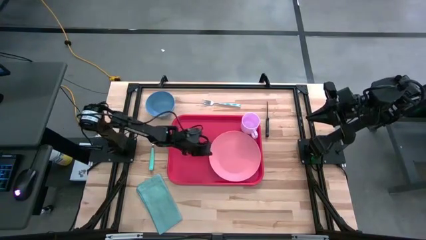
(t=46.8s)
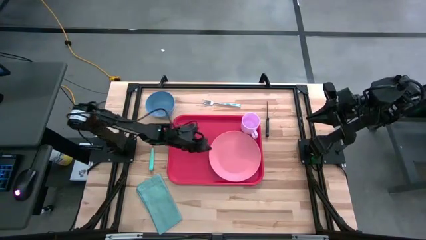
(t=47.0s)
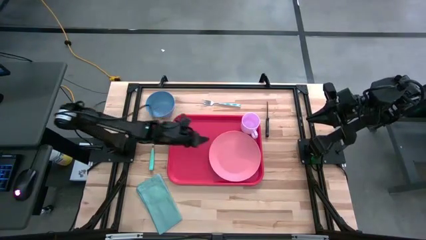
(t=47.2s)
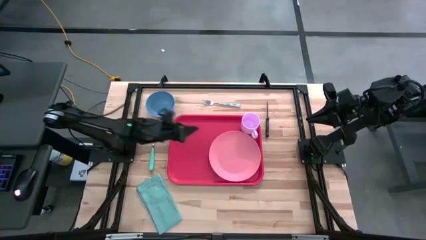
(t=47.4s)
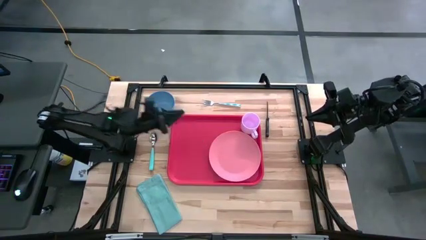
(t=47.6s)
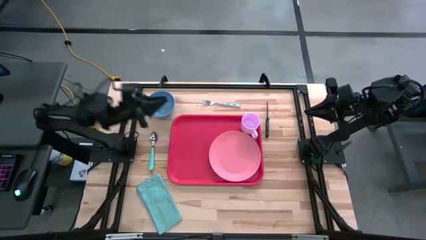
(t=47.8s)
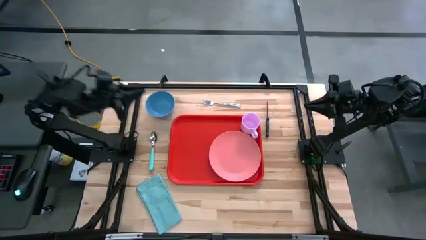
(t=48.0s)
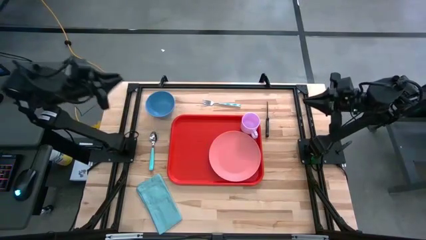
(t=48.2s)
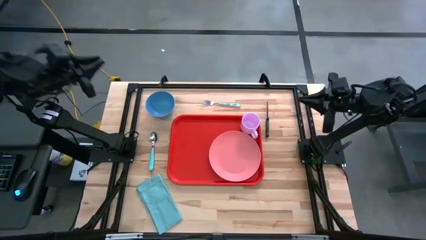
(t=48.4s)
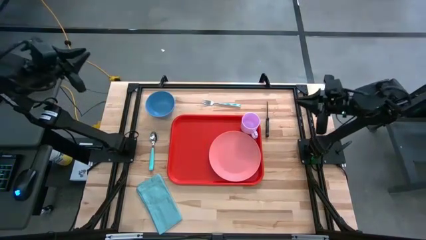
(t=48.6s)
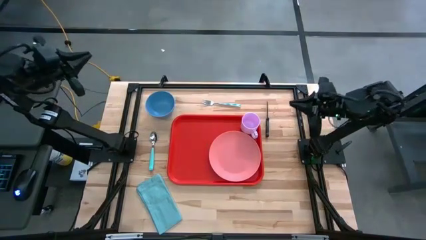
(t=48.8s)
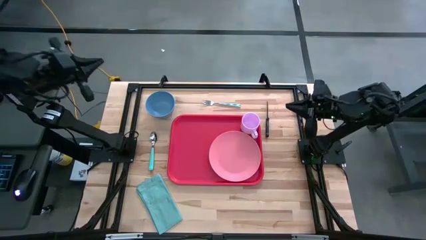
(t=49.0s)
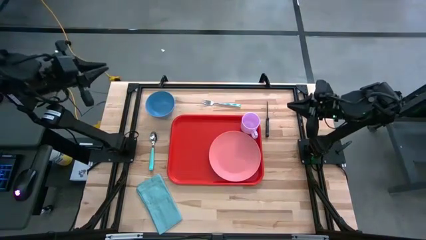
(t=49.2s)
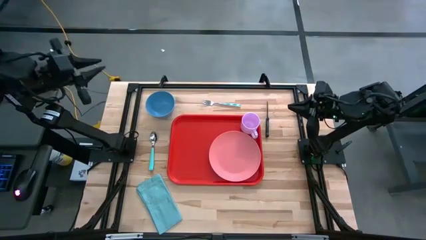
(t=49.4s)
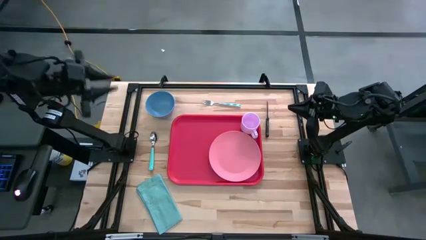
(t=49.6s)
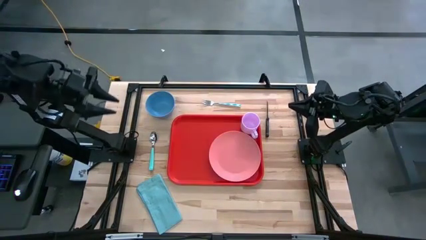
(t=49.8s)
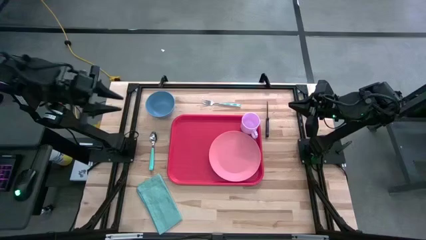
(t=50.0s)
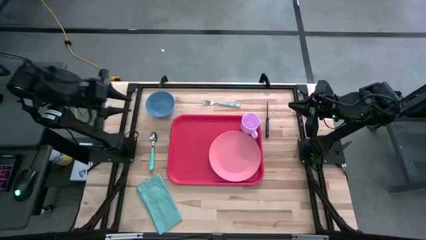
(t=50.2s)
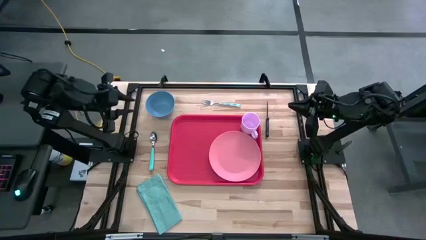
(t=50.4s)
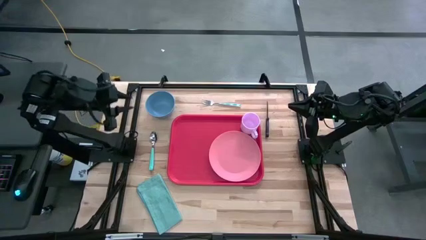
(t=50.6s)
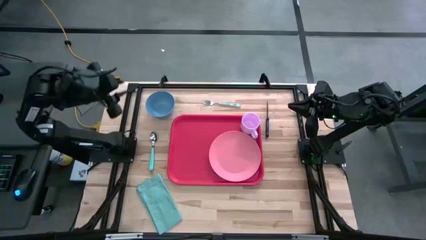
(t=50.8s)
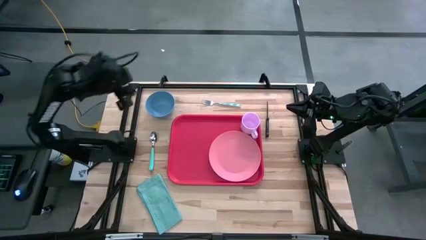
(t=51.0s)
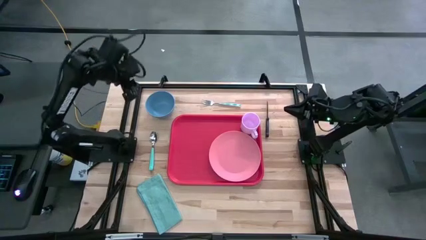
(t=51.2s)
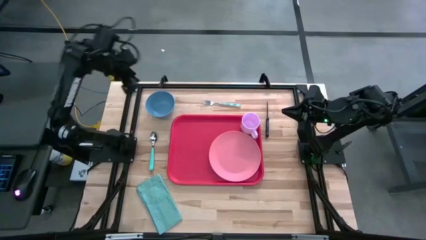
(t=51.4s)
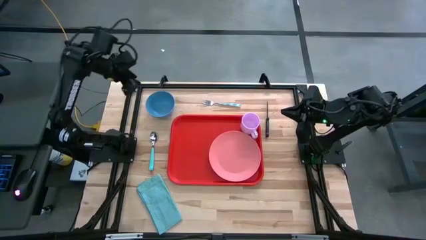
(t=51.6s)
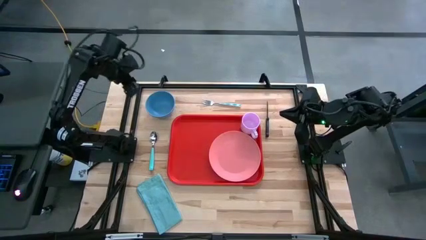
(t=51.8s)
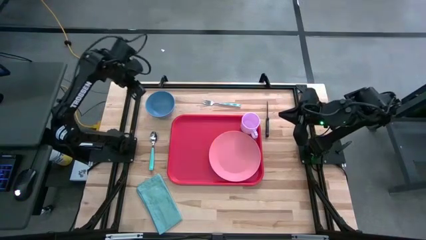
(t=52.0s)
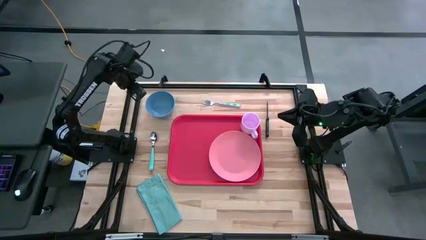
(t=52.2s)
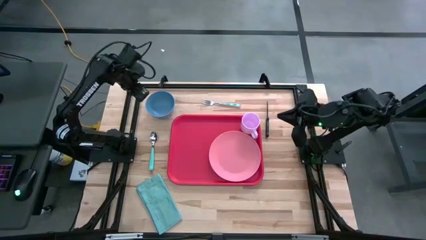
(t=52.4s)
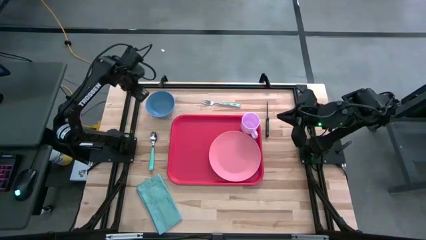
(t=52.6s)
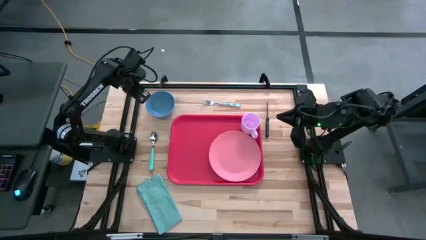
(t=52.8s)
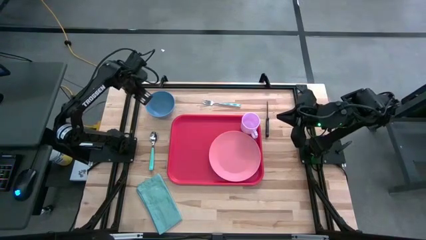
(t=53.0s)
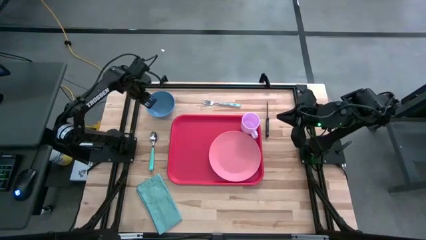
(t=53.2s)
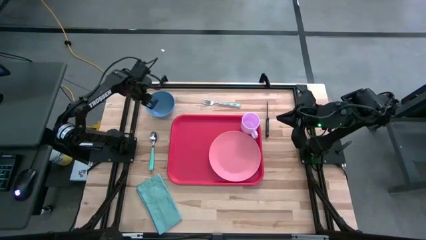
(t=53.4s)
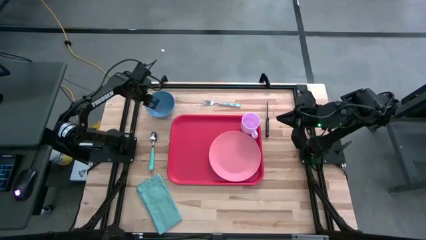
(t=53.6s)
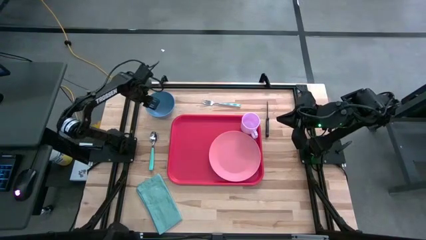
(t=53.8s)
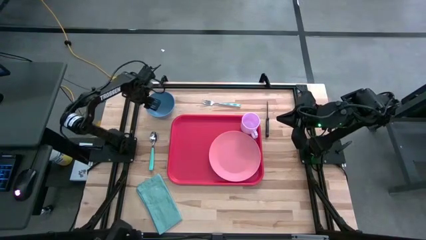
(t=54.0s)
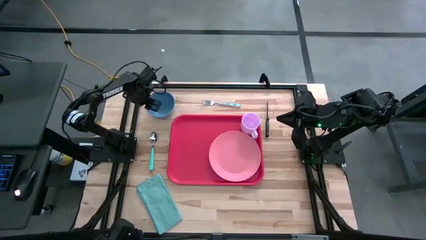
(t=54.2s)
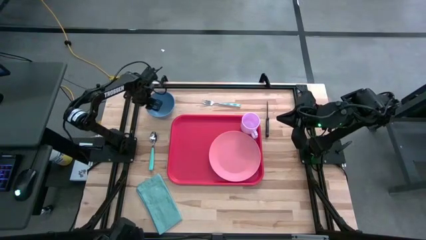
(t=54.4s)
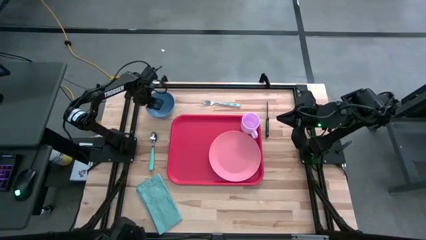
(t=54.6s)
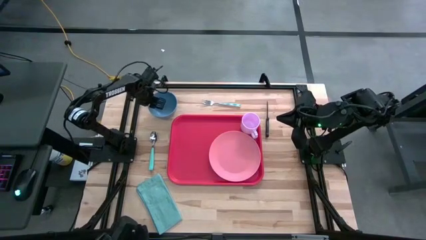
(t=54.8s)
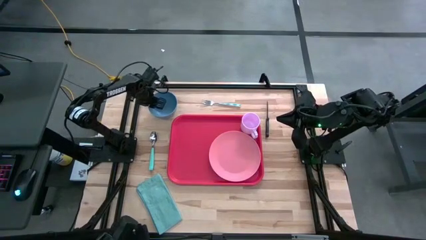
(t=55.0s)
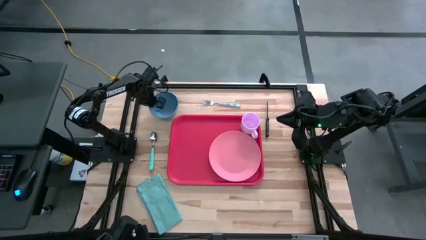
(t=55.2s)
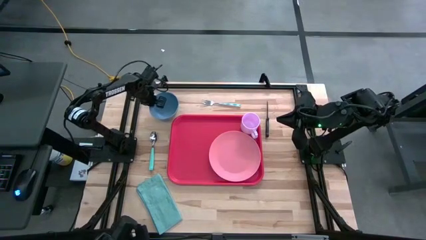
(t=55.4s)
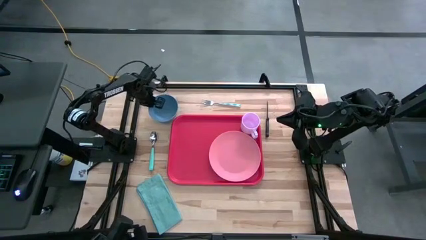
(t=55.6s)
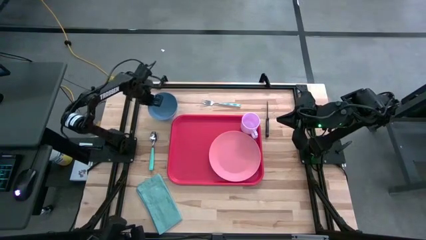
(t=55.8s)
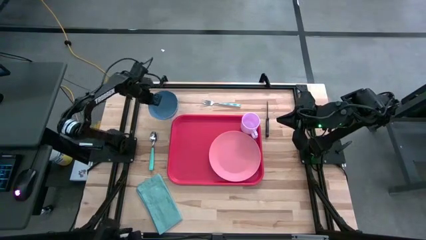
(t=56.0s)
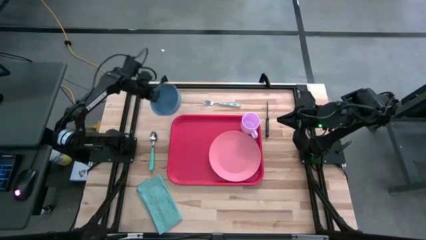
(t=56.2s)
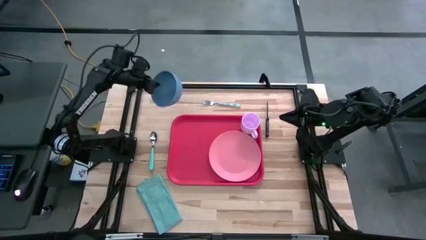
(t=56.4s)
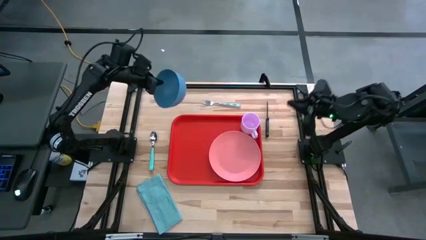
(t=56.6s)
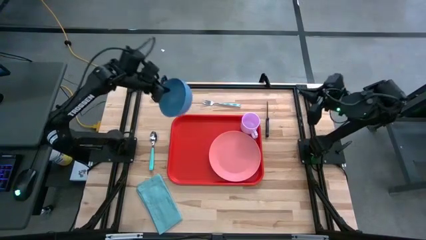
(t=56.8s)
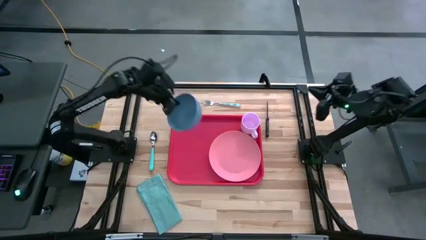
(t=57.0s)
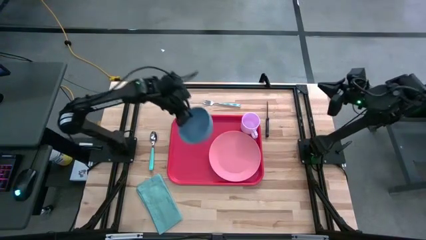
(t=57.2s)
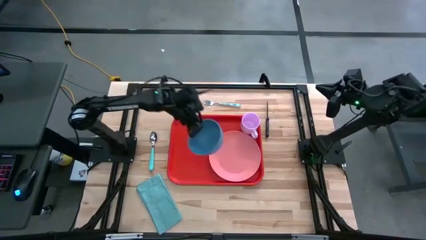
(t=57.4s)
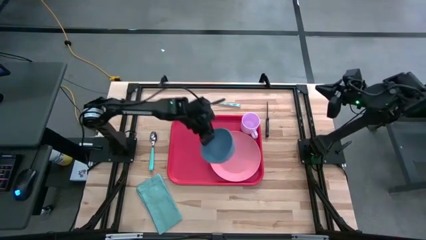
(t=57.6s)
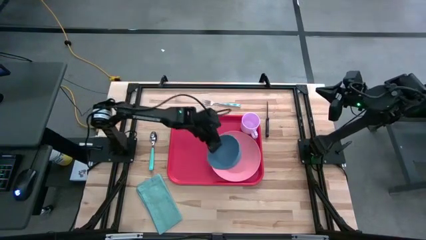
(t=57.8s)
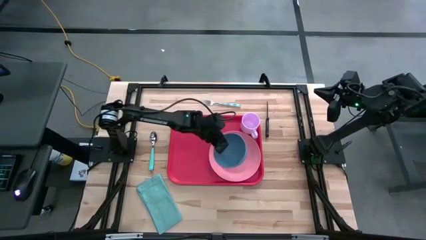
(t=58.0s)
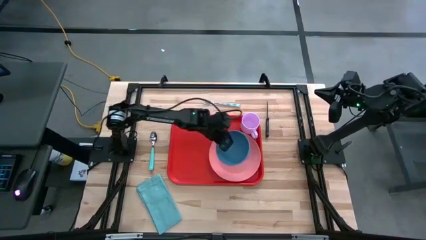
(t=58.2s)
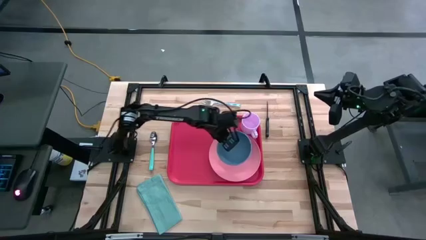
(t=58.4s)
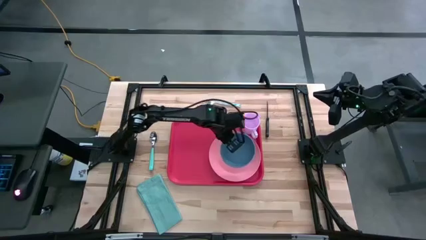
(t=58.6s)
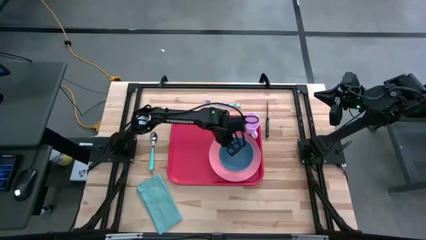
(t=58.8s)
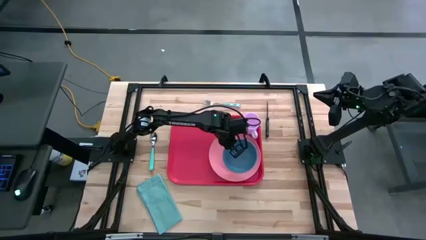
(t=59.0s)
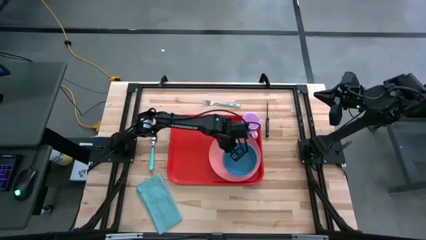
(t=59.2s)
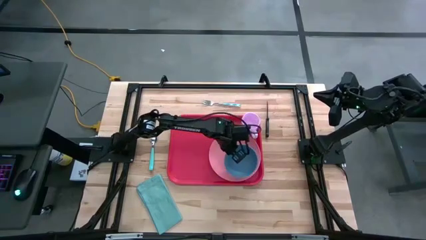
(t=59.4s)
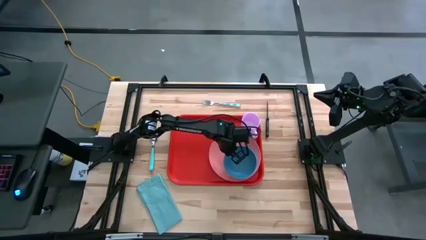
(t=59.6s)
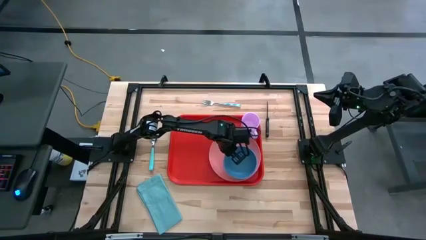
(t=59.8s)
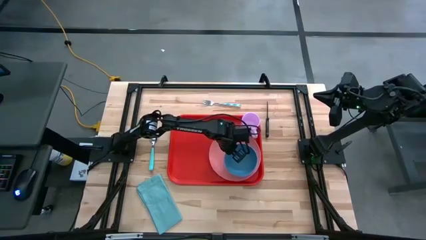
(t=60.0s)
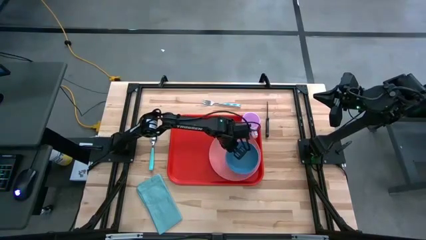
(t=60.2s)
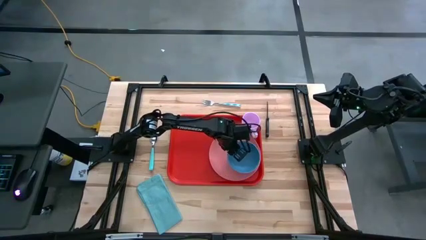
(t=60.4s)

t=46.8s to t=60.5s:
Task: Set up tray
Put the blue bowl on the pink plate

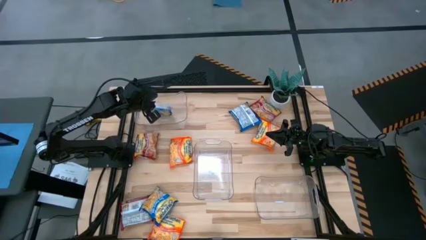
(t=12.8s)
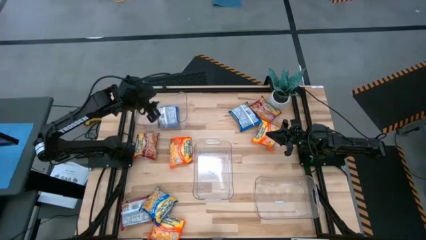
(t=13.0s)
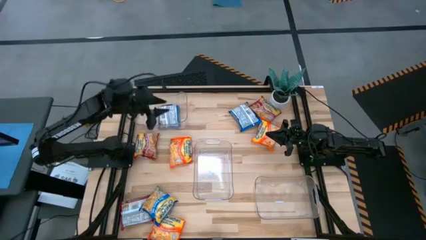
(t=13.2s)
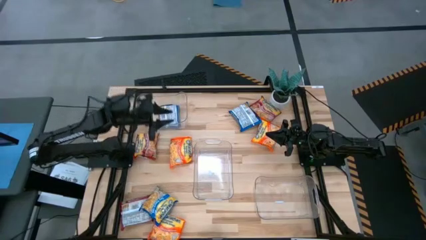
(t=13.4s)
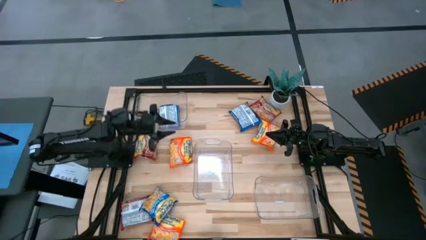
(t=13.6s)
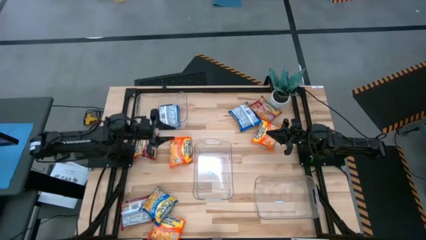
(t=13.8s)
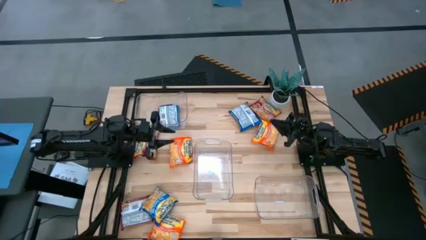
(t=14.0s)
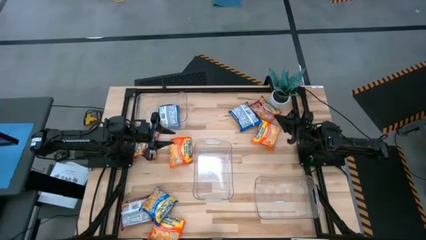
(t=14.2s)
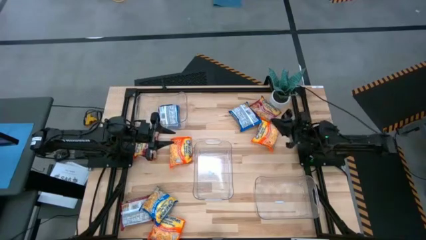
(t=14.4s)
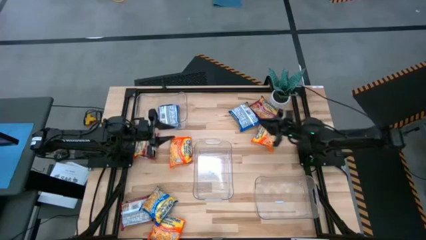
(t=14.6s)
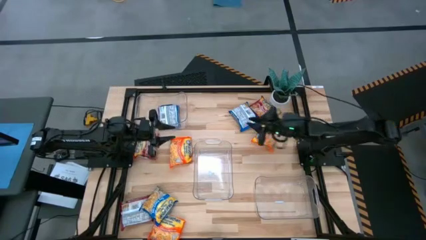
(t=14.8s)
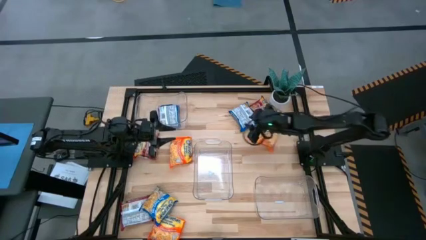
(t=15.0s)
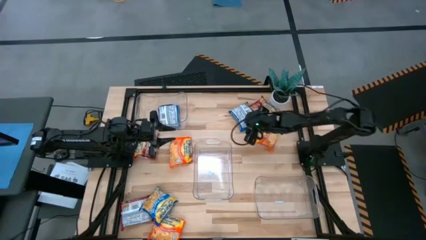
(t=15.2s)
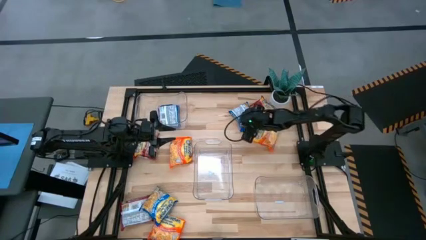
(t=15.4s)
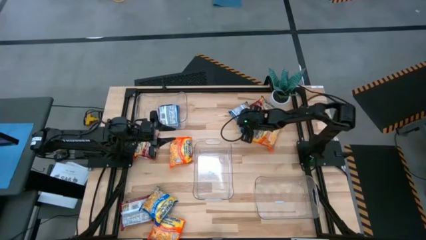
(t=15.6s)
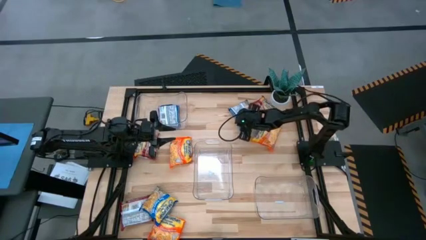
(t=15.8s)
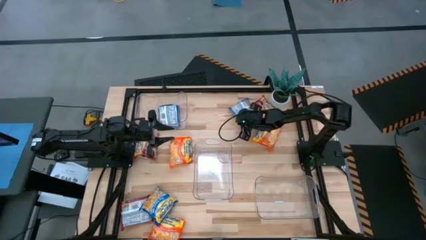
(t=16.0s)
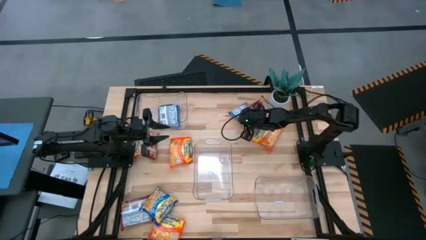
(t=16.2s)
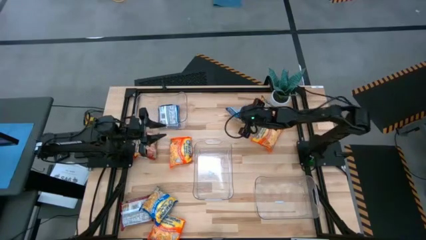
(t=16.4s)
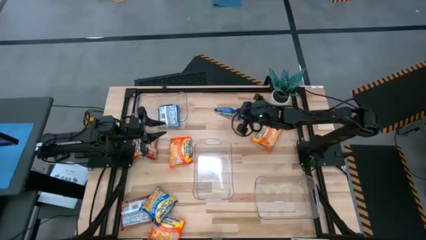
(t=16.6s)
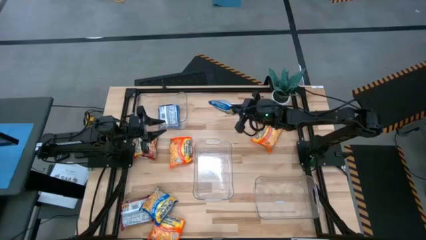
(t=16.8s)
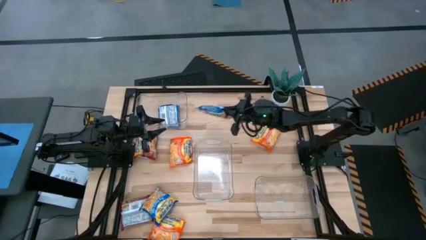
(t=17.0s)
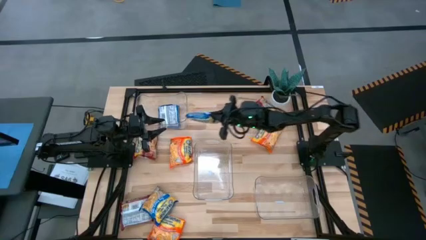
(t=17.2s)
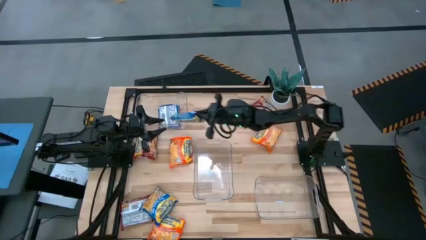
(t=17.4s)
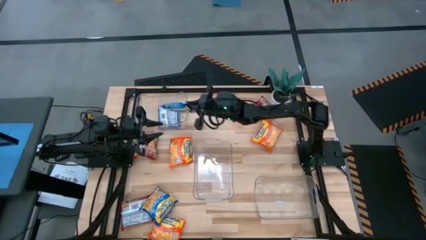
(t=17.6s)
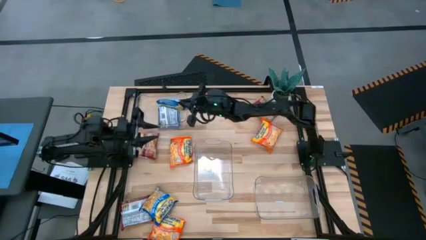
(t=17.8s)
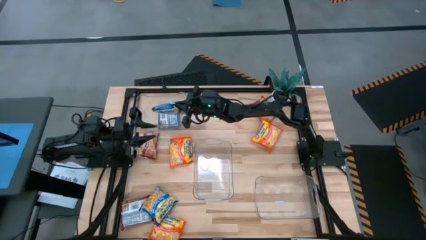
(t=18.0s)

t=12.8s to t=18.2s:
Task: Sort Maruchan noodles
Put the top blue noodle pack into the top transparent bin
